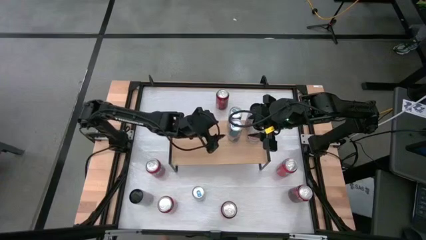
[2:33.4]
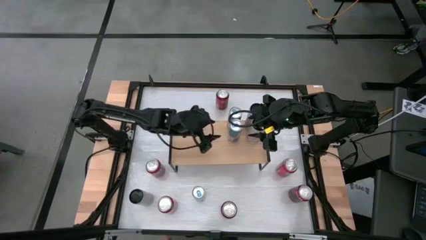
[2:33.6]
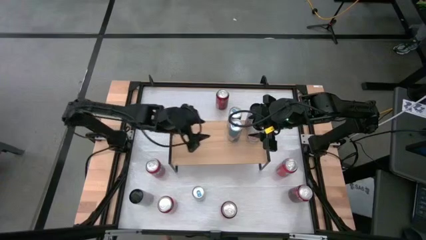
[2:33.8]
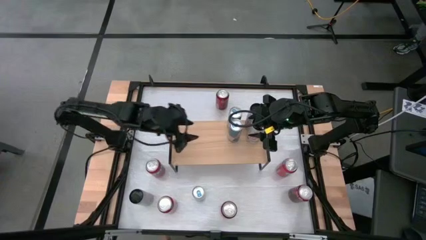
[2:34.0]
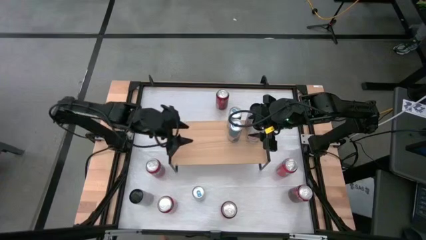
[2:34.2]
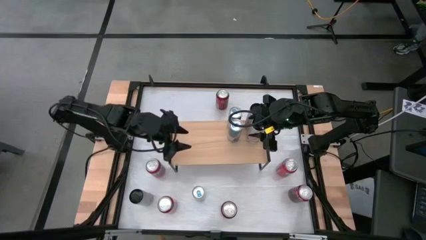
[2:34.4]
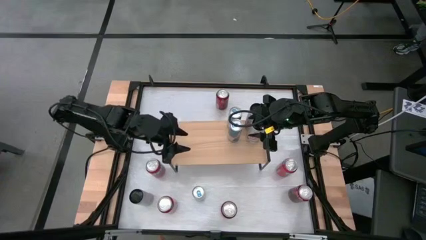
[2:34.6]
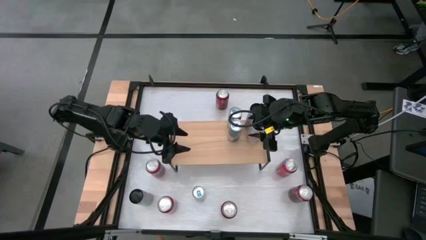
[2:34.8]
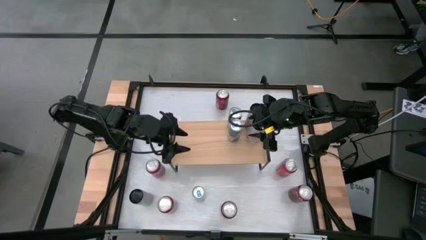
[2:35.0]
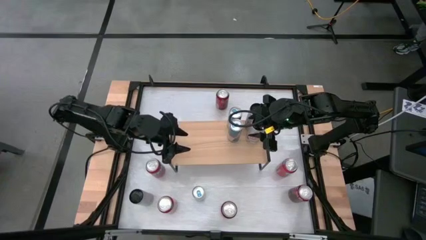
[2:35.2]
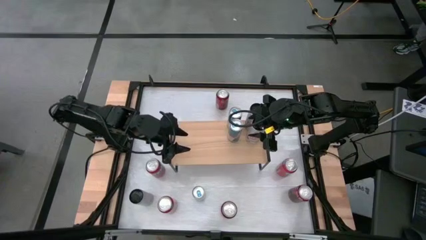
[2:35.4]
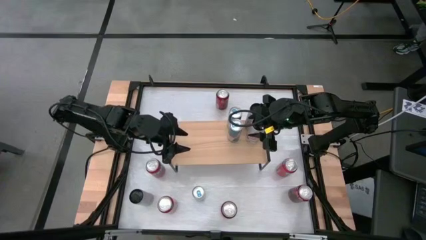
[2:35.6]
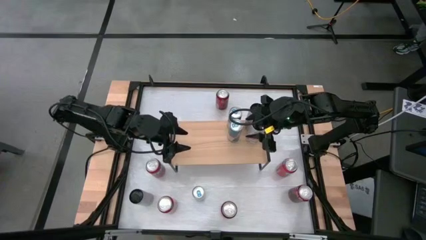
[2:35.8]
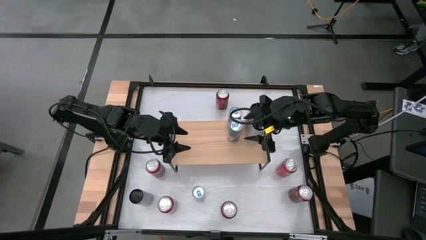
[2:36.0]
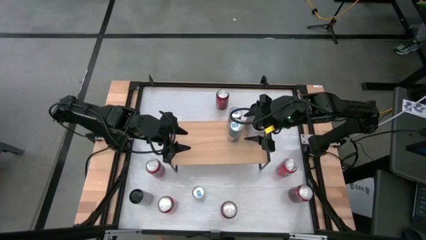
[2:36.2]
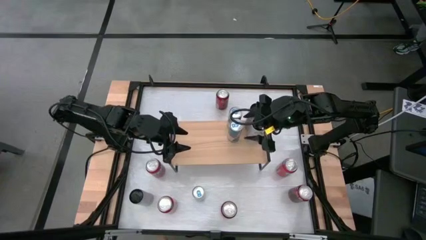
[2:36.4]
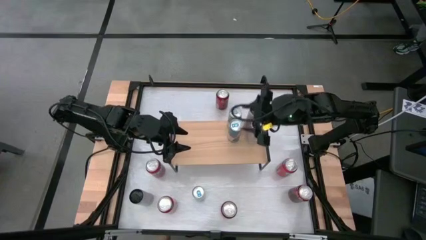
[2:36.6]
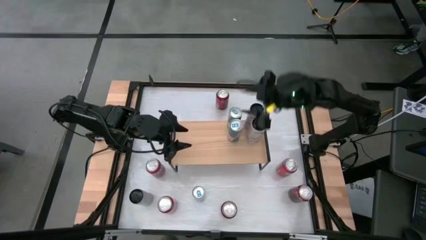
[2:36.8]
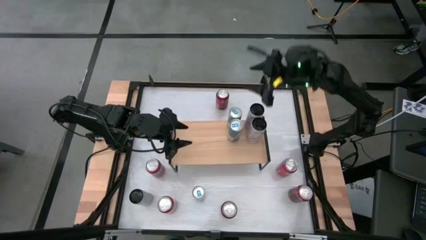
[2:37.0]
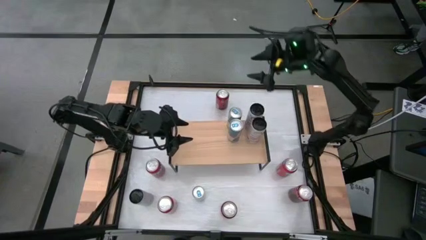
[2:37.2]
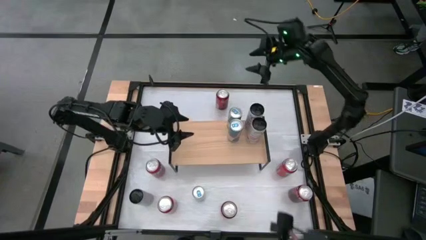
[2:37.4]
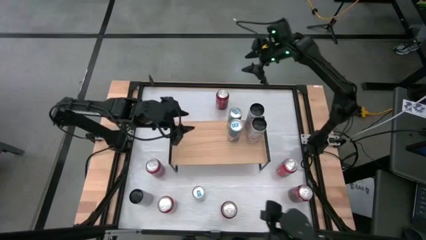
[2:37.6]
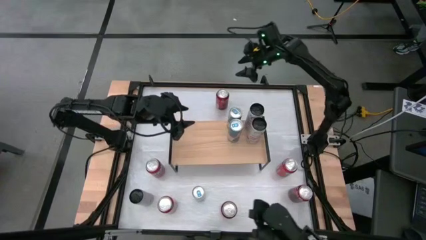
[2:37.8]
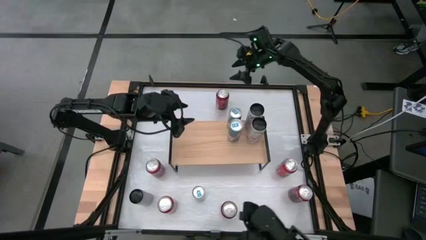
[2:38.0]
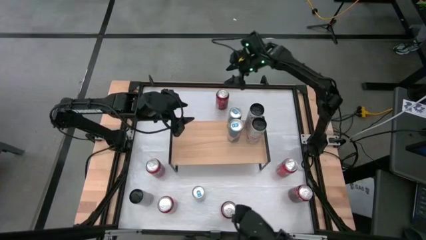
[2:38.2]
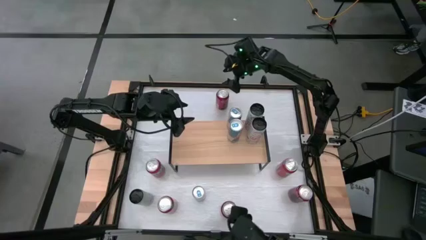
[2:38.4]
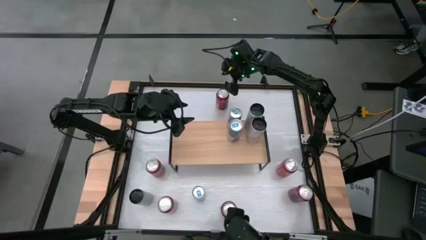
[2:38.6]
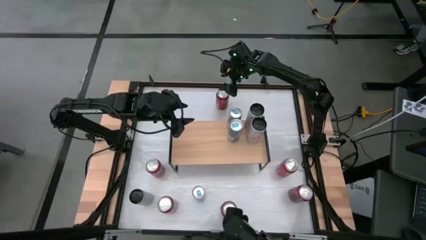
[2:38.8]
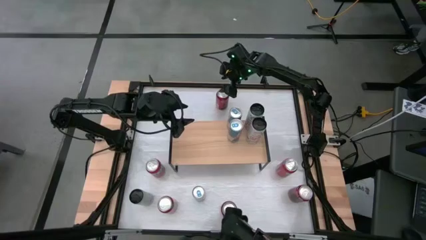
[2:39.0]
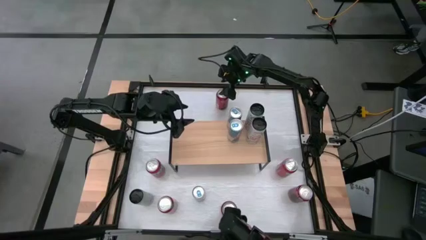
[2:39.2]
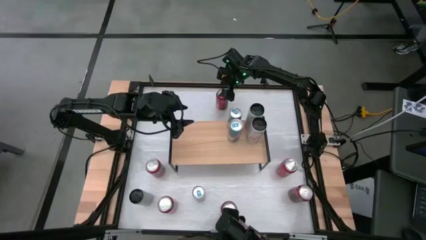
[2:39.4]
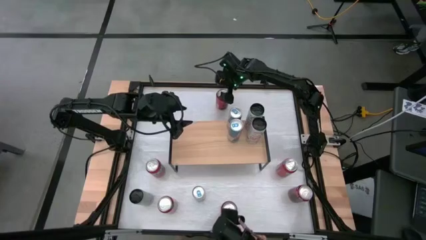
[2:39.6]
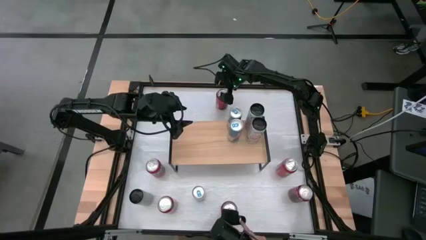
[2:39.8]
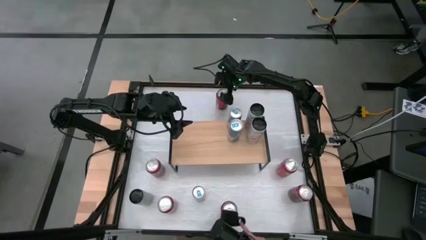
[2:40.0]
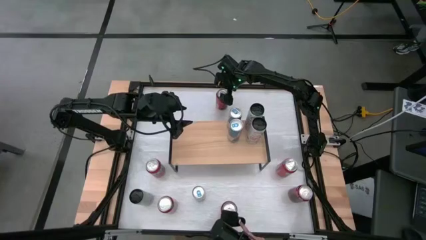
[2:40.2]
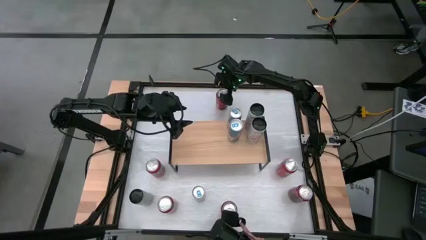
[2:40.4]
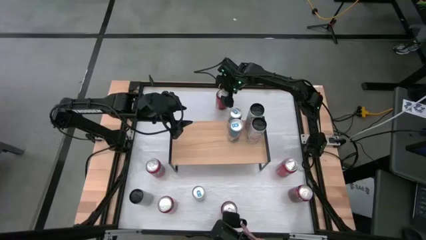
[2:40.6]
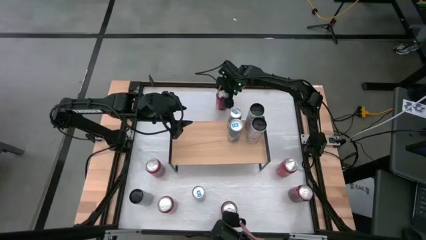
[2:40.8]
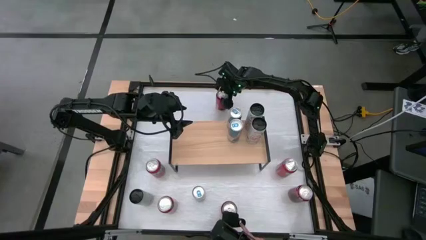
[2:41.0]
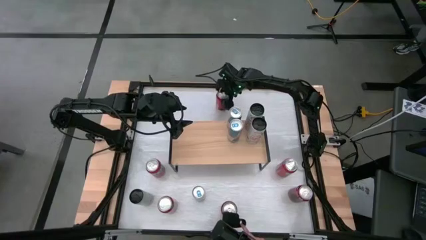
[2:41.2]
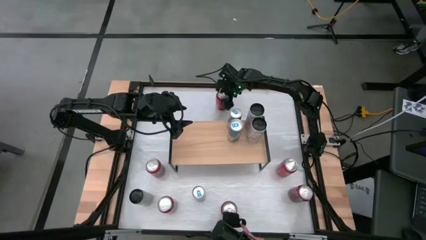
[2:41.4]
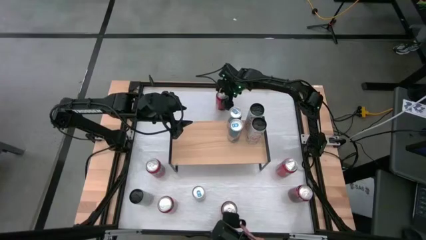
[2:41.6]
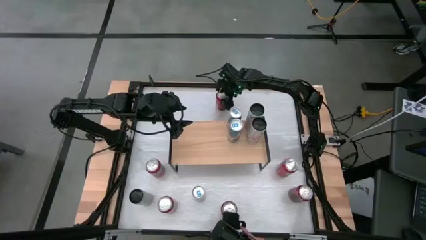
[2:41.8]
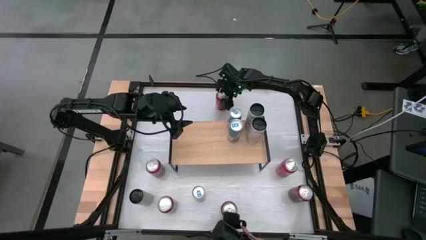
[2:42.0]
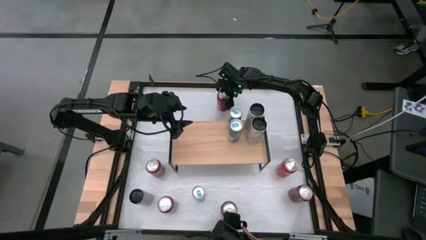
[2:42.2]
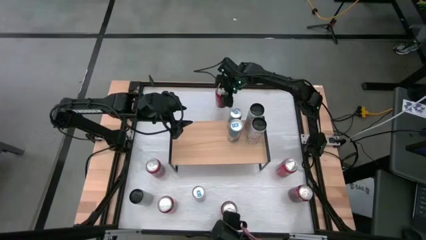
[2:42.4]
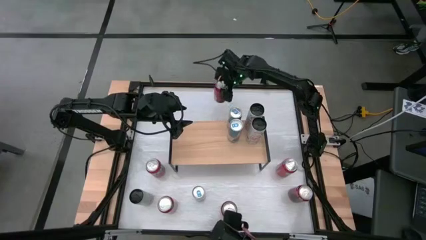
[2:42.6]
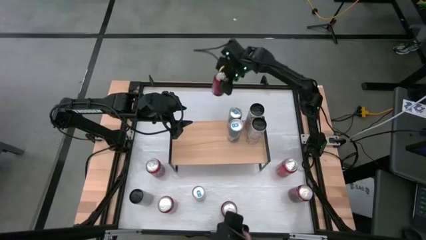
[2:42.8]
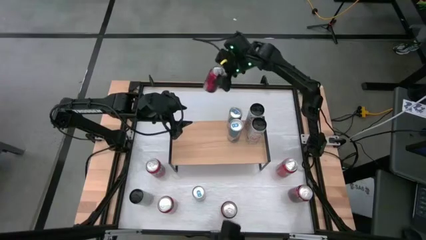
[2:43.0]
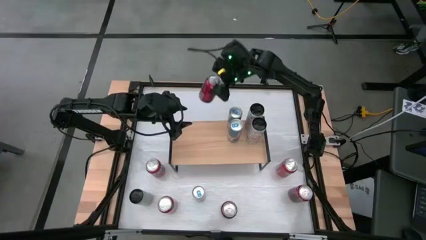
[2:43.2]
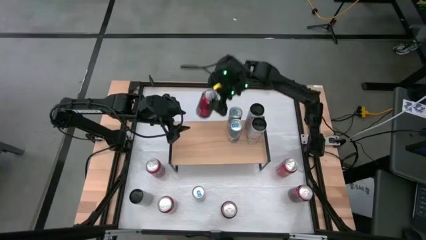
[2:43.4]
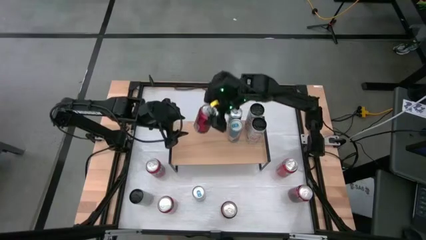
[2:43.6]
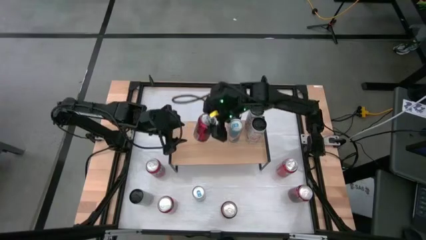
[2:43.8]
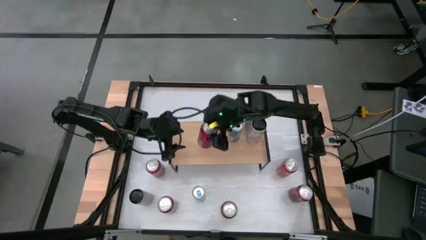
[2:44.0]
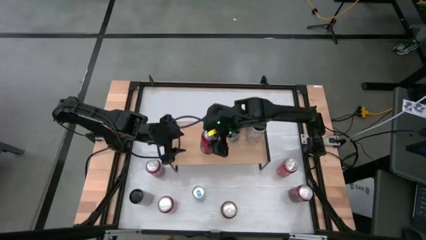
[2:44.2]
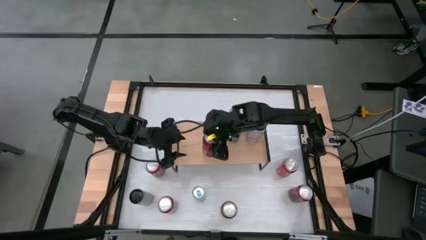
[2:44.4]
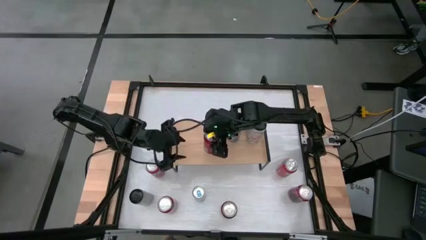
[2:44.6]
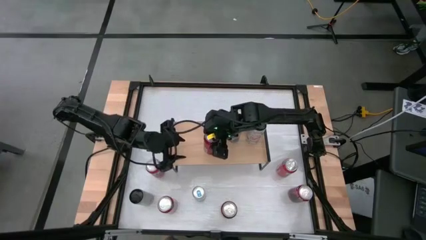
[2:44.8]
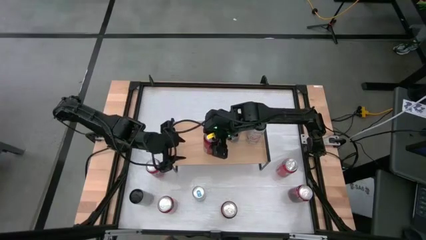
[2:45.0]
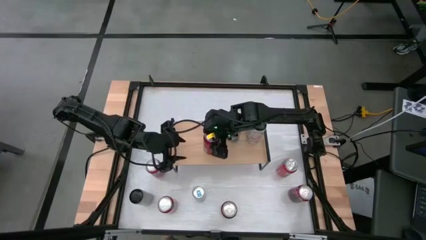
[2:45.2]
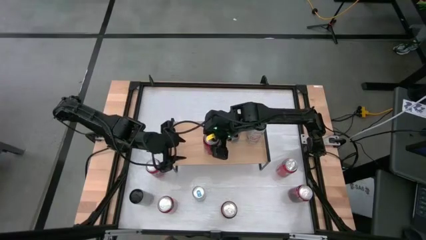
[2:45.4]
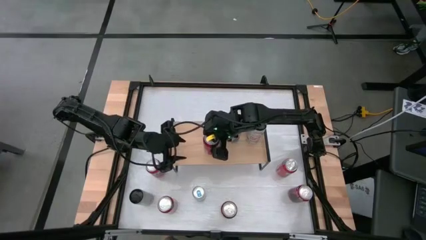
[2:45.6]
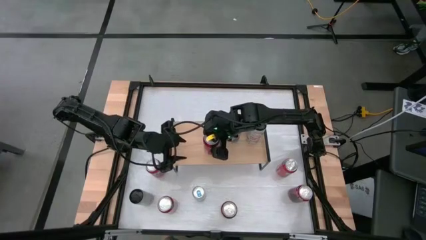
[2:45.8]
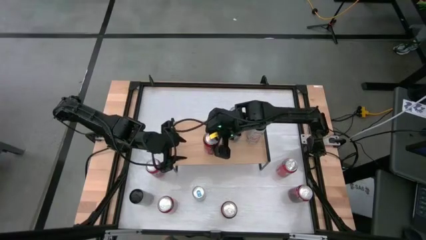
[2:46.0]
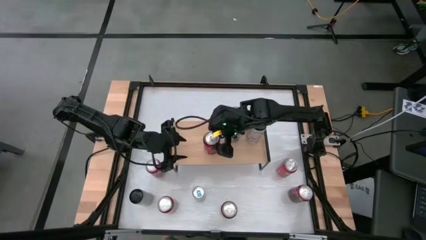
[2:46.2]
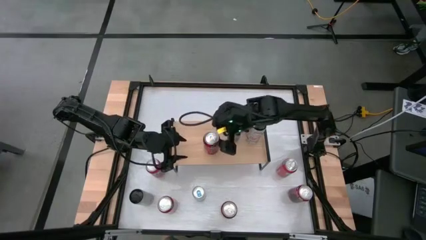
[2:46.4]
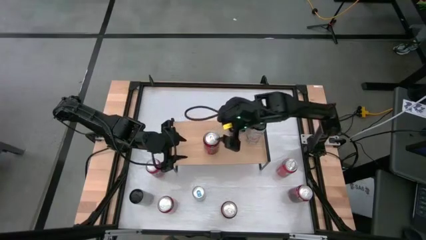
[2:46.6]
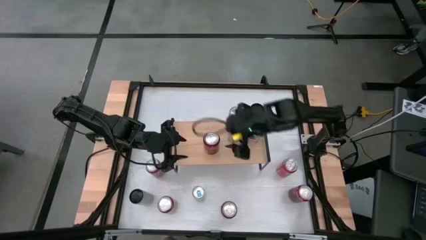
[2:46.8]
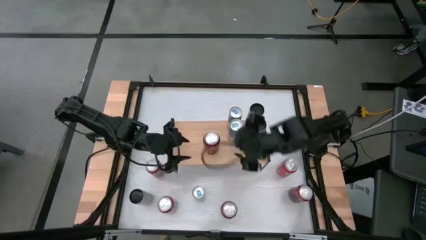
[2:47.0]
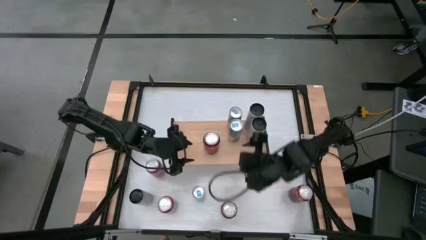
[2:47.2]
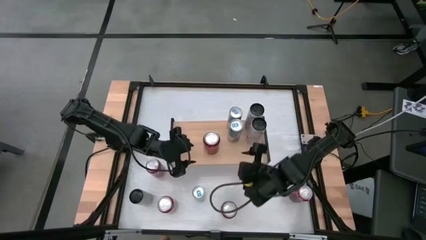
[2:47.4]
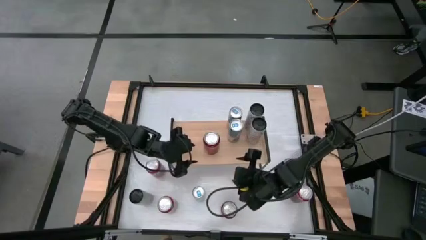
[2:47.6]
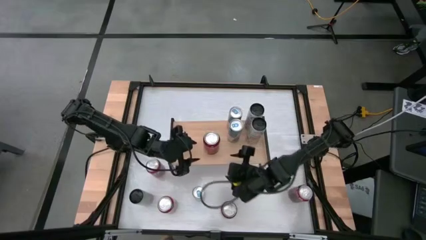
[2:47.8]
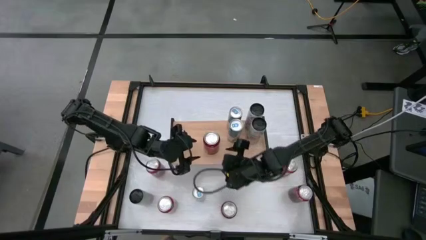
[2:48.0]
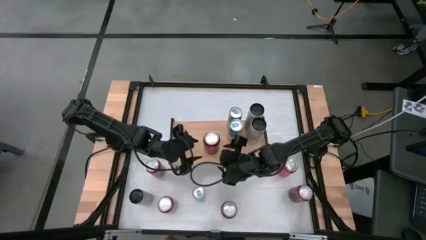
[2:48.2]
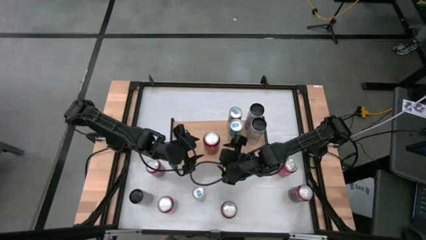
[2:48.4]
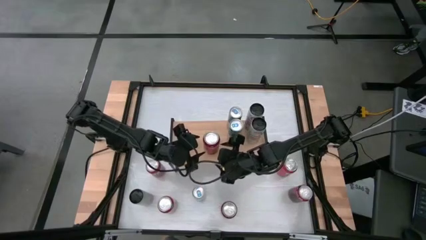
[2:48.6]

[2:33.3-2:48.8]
Task: Place canned beverage on shelf
Put the top red-black soda can on the shelf

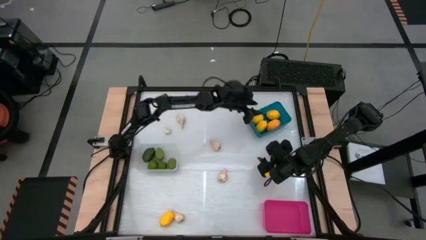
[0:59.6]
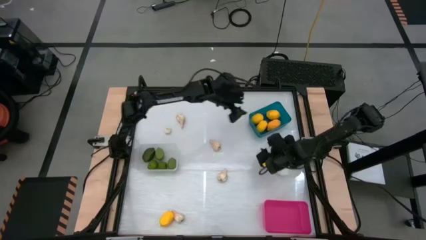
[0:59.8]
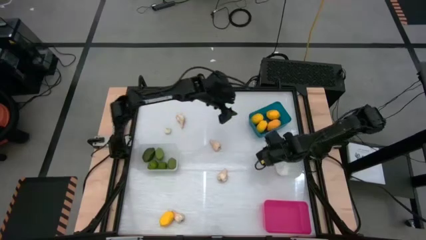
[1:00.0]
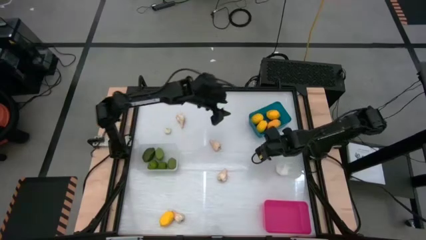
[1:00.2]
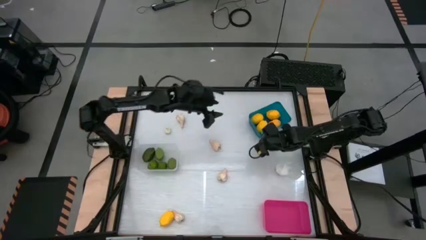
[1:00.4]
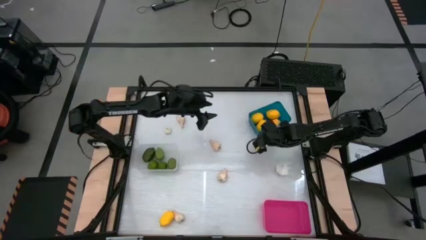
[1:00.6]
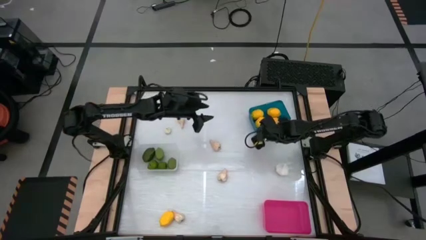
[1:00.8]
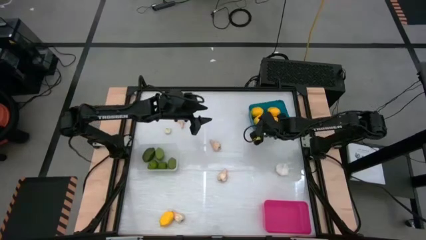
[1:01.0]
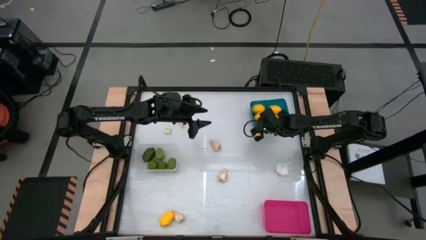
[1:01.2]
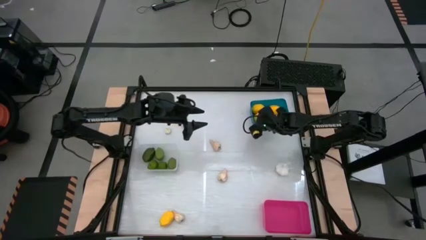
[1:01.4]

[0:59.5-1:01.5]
Task: Sort produce into baskets
Adjust the blue bin
